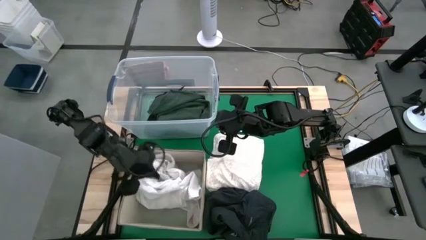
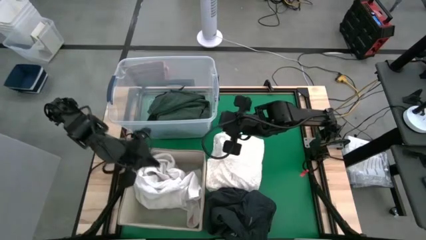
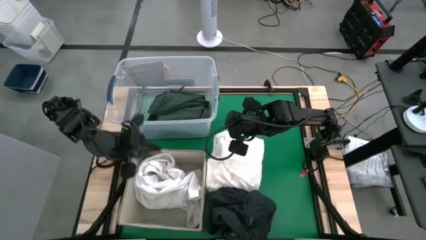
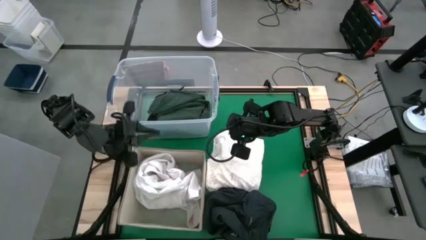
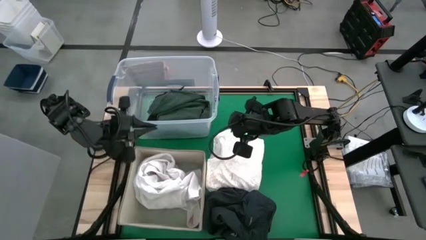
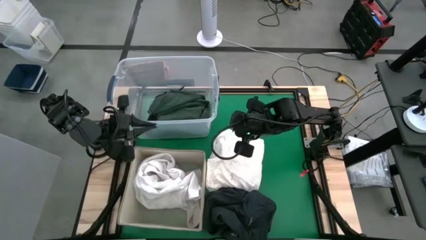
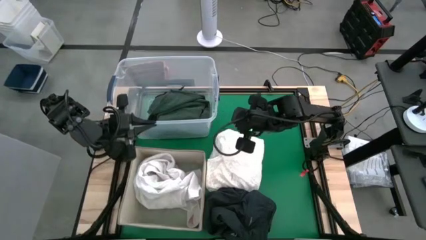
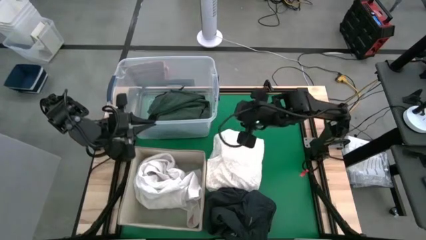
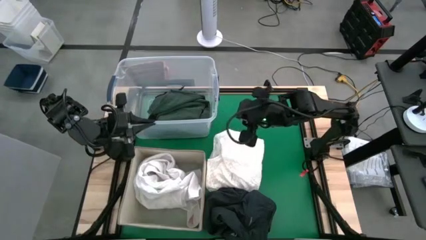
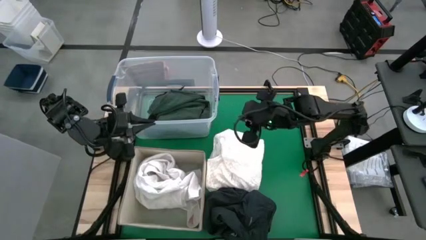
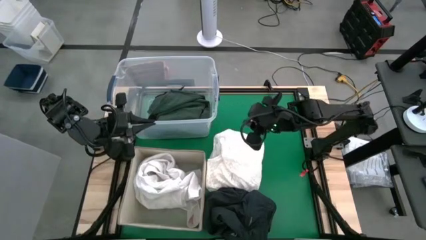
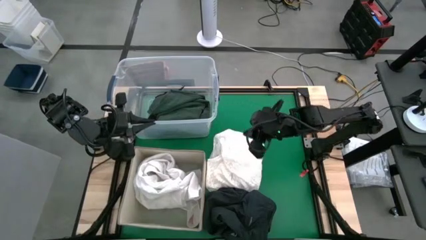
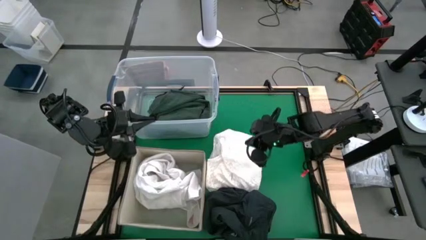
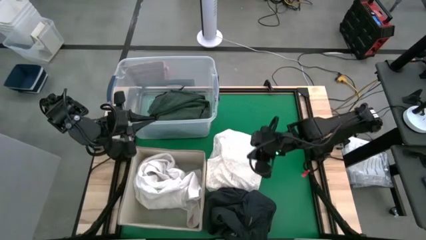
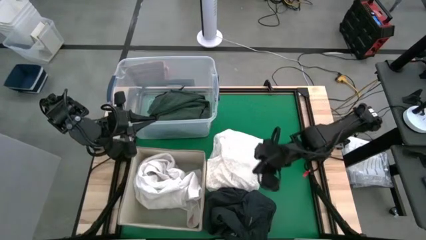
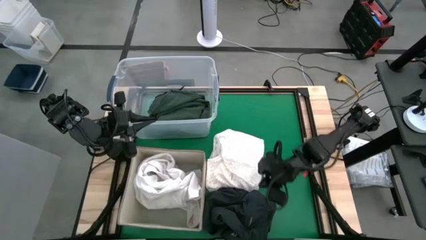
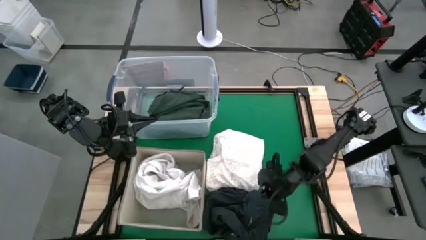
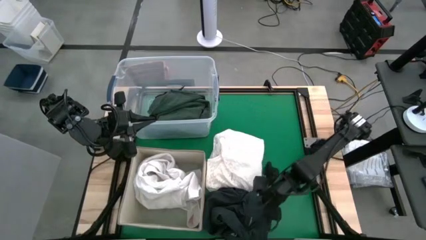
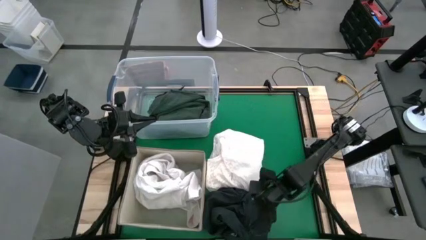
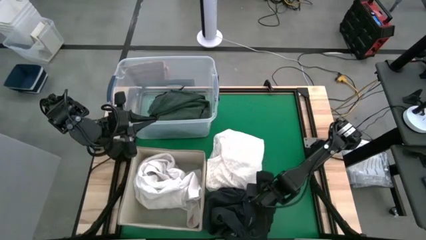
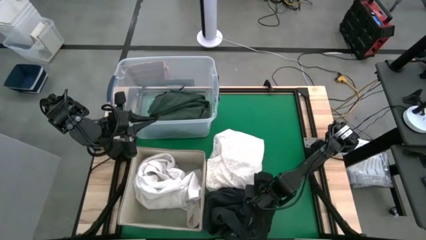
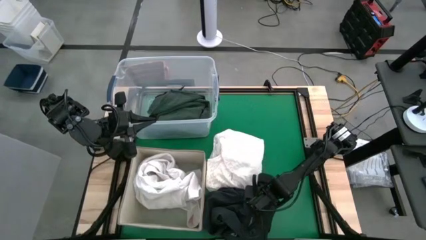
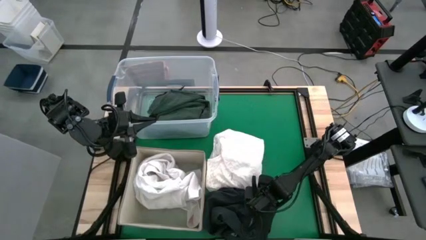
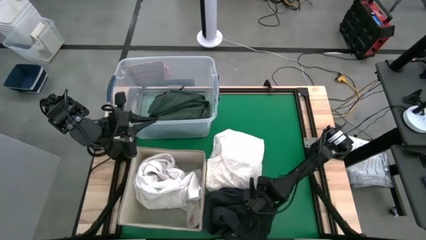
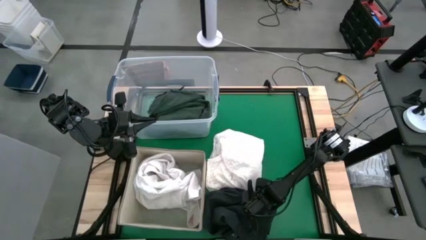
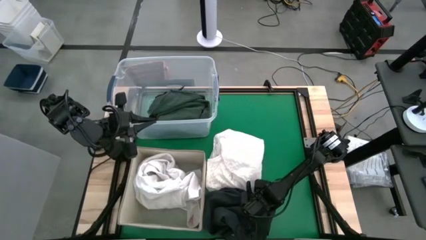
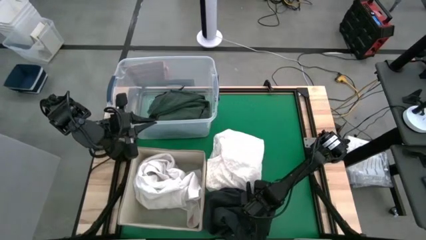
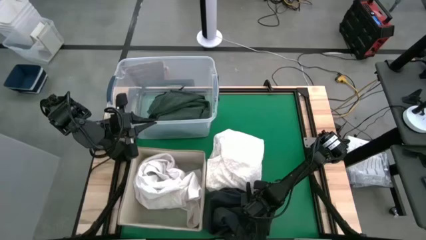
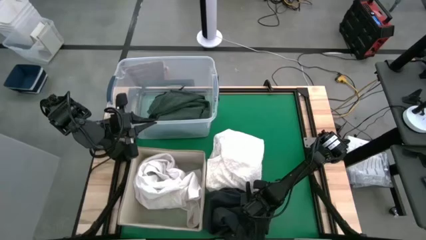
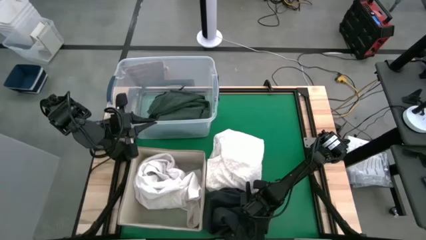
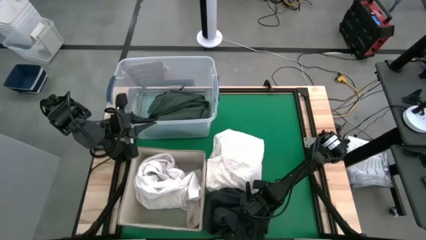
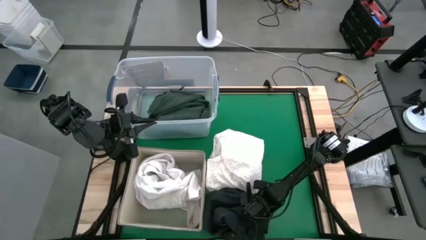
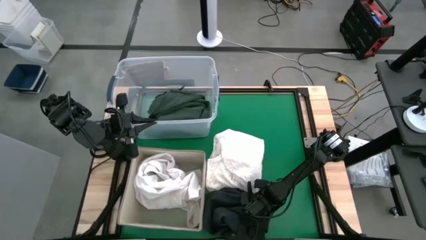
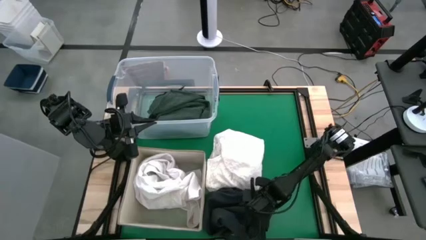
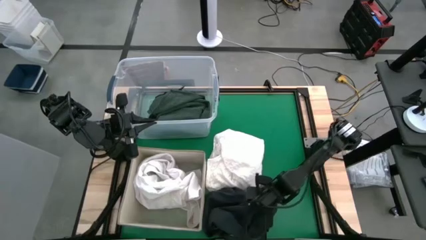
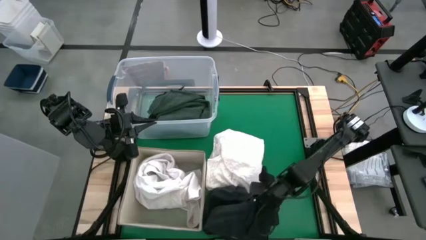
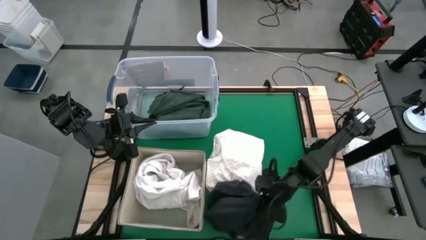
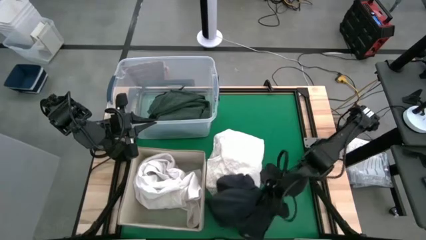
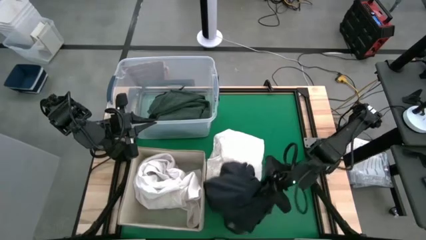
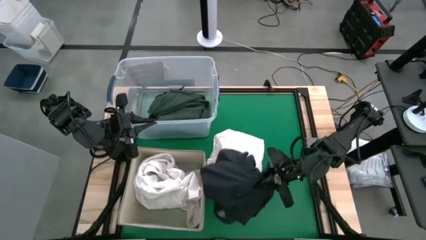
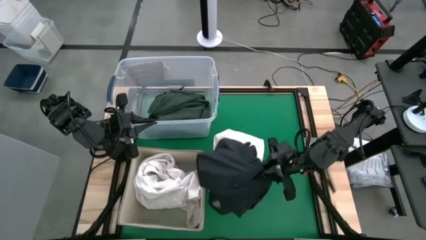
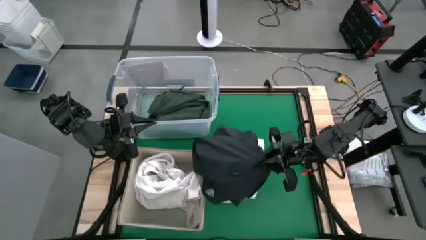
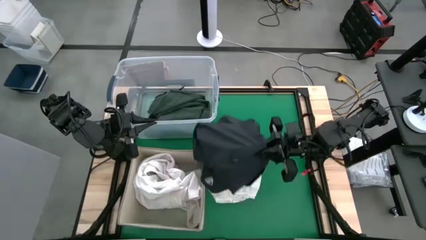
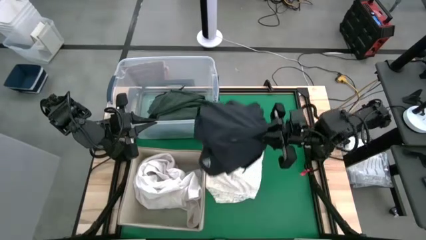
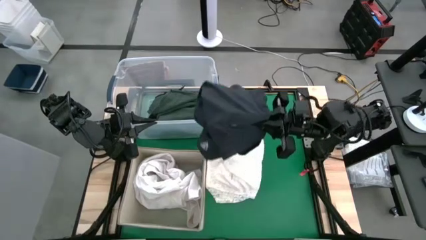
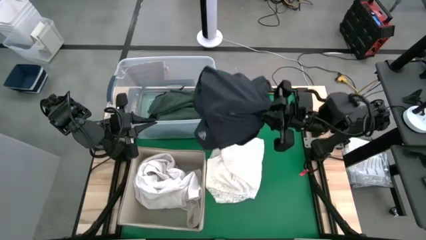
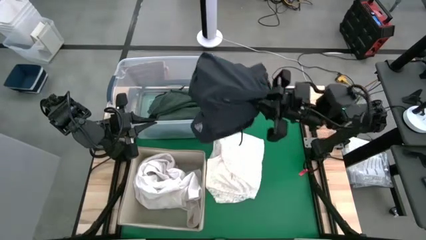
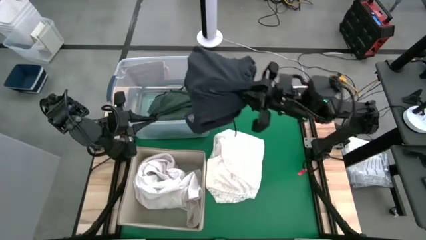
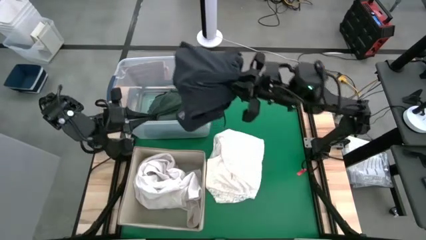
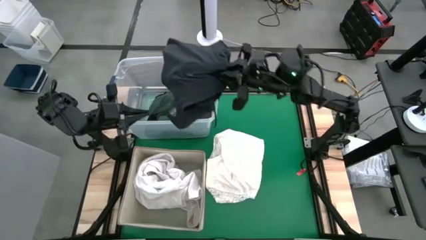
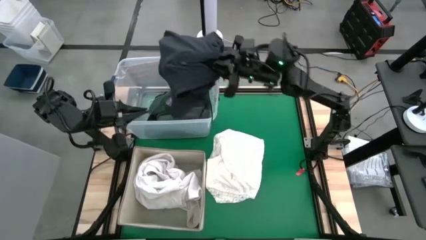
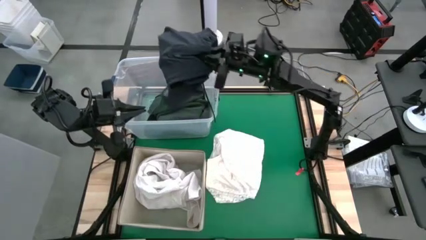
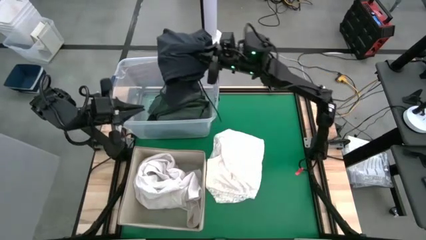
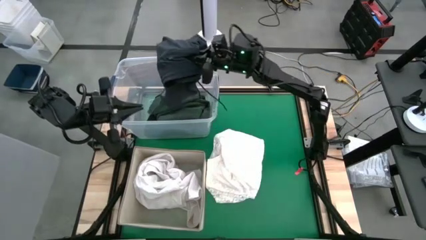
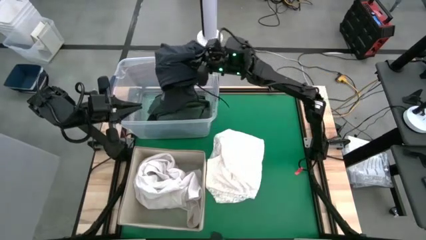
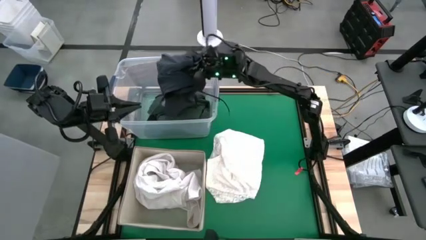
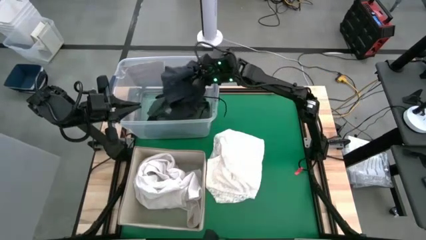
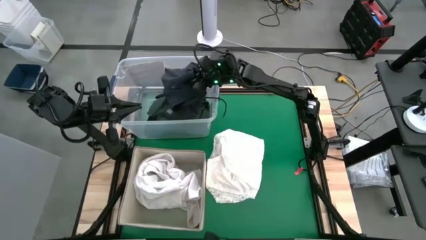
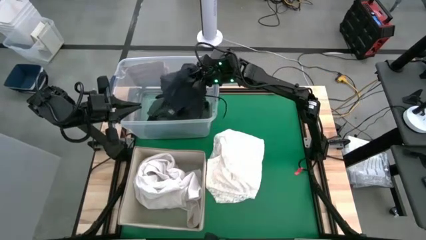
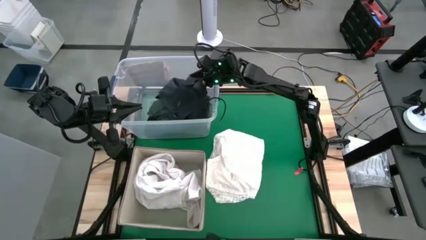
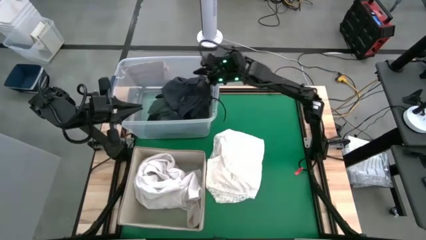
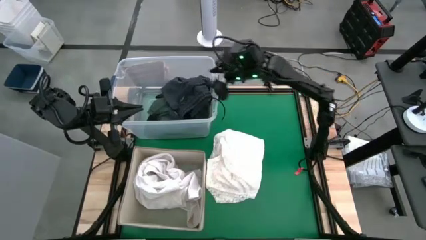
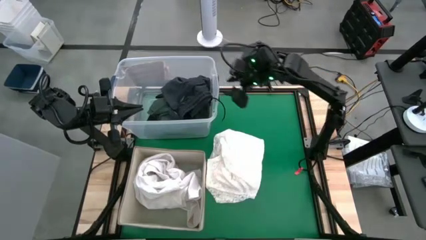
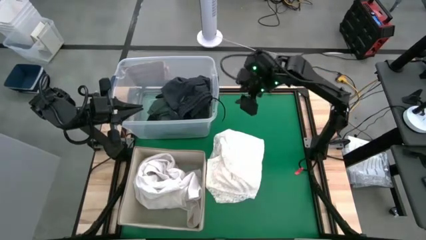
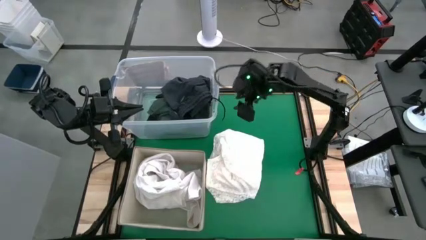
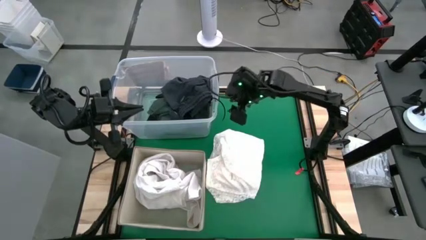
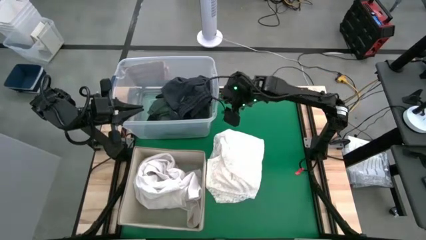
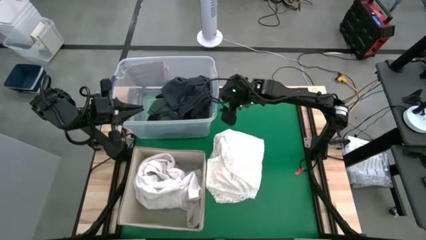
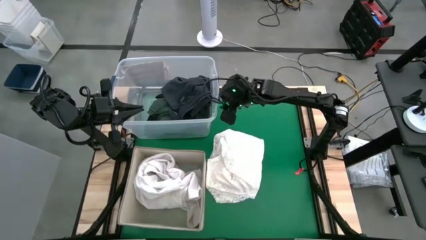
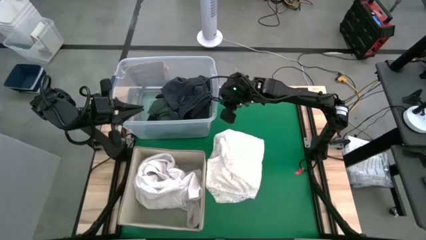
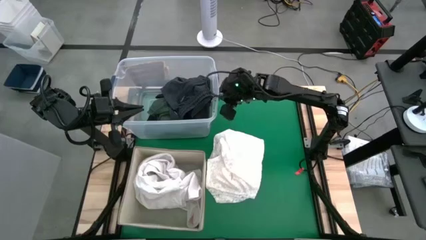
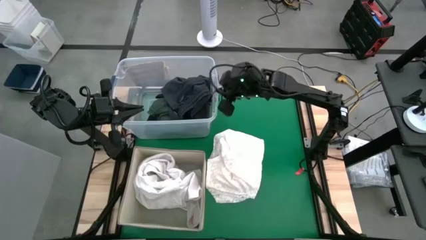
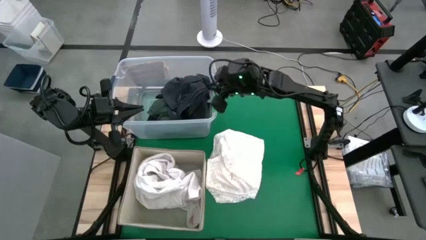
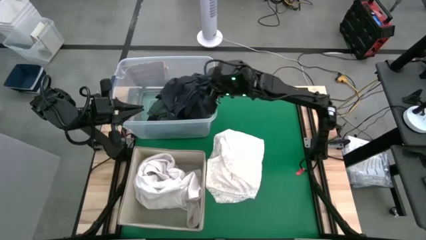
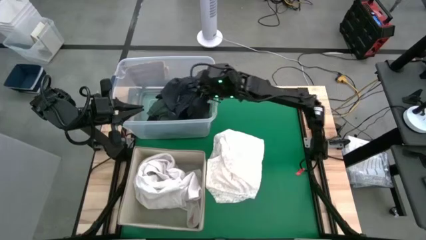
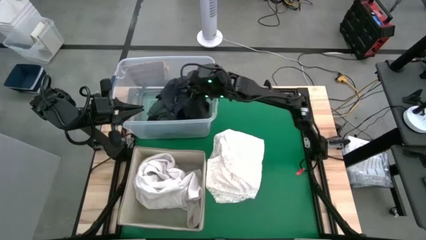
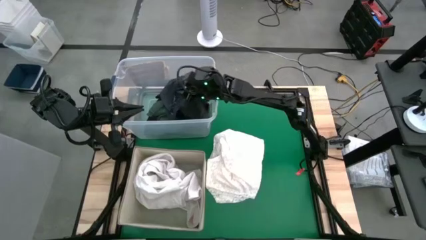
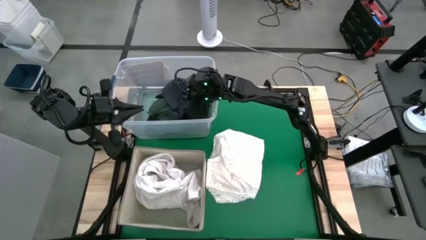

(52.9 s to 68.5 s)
Task: Sort clothes
Put the black pants into the transparent bin
